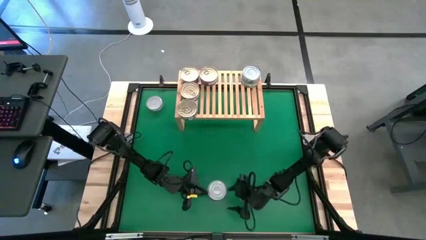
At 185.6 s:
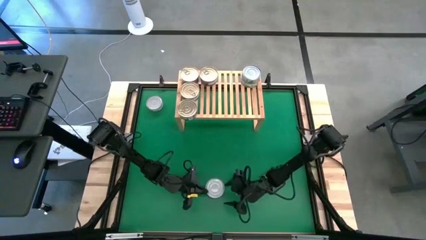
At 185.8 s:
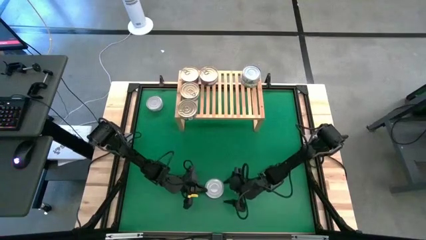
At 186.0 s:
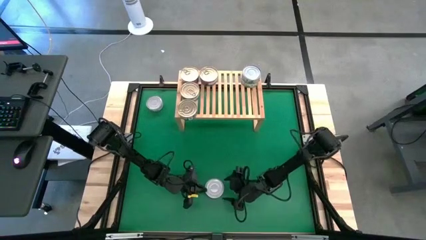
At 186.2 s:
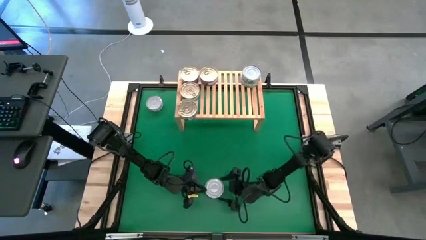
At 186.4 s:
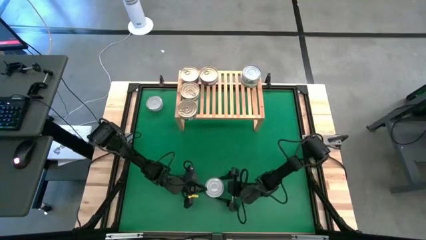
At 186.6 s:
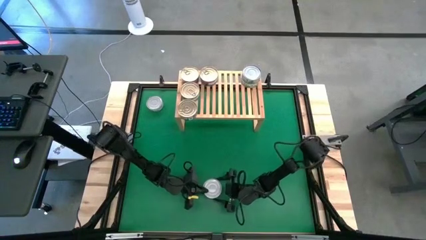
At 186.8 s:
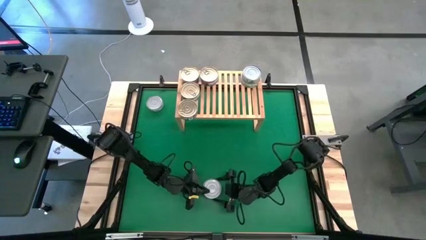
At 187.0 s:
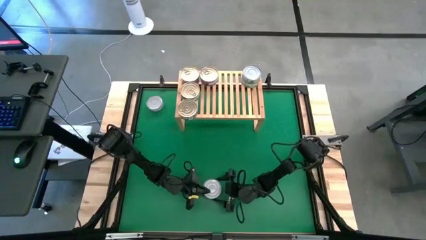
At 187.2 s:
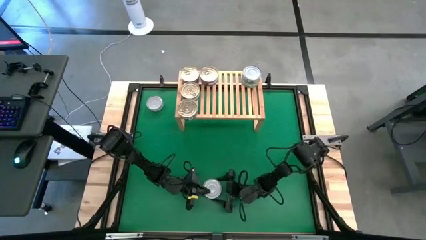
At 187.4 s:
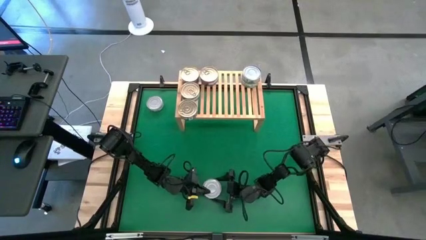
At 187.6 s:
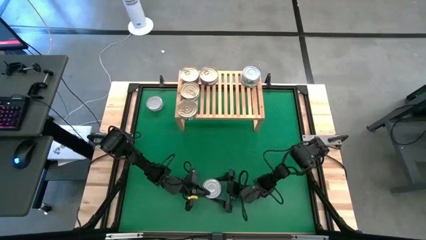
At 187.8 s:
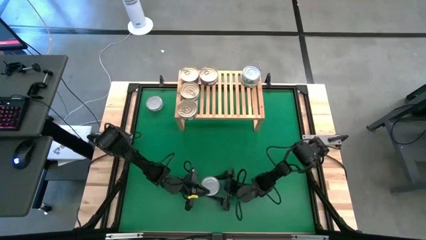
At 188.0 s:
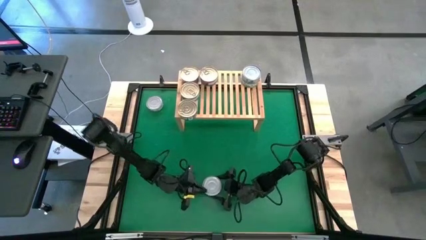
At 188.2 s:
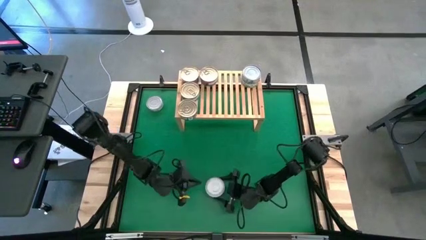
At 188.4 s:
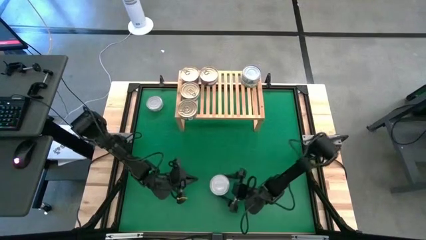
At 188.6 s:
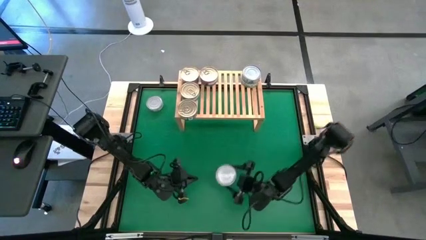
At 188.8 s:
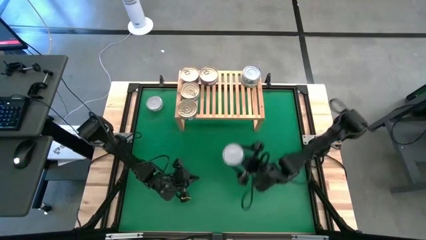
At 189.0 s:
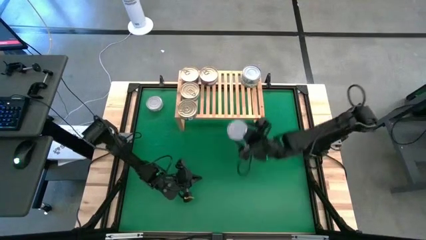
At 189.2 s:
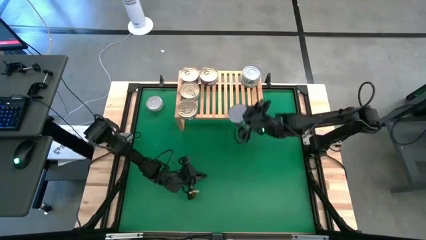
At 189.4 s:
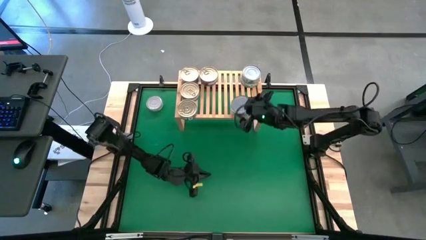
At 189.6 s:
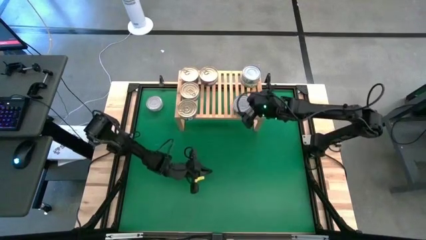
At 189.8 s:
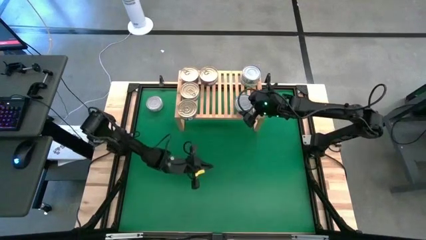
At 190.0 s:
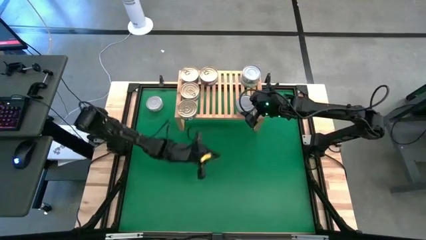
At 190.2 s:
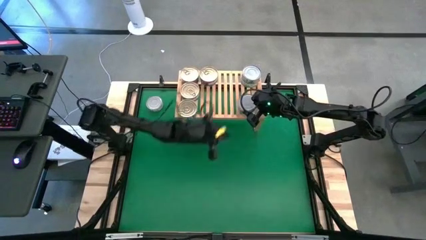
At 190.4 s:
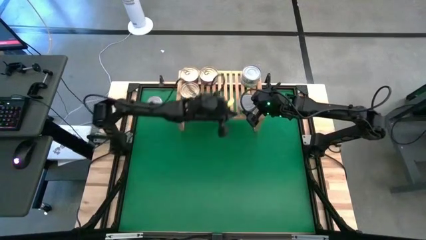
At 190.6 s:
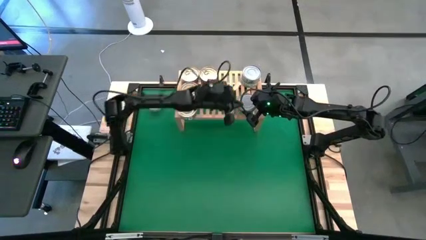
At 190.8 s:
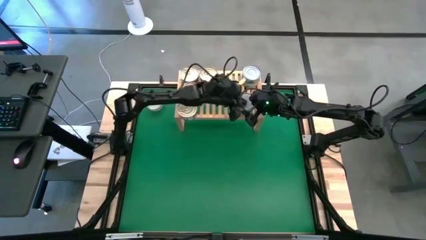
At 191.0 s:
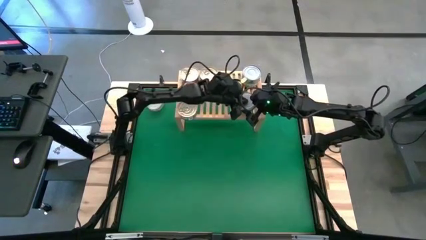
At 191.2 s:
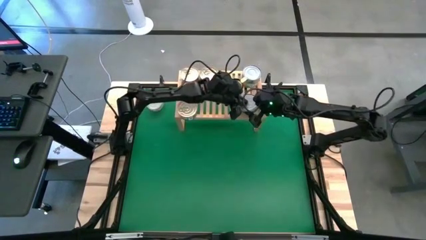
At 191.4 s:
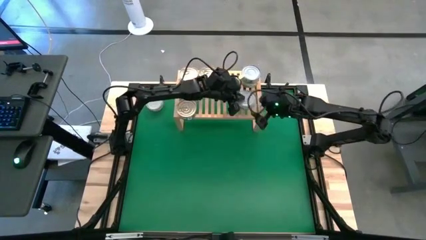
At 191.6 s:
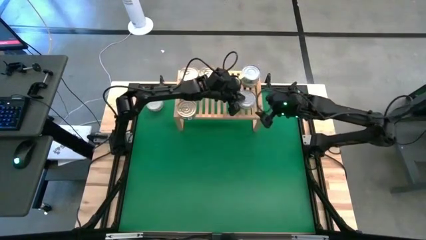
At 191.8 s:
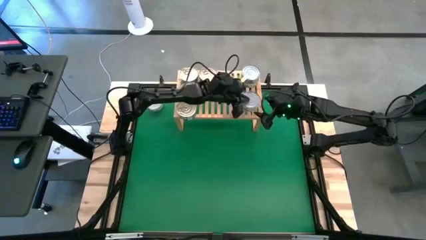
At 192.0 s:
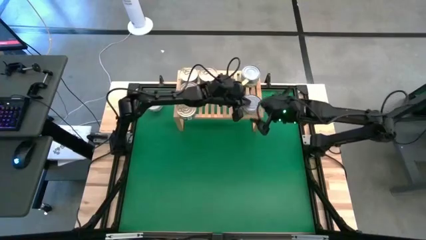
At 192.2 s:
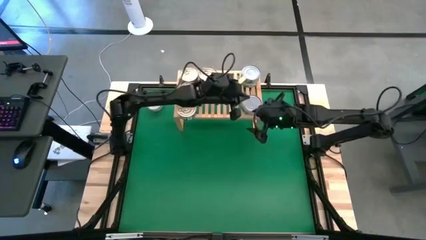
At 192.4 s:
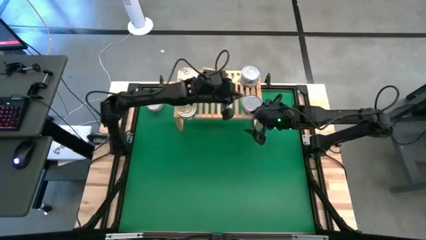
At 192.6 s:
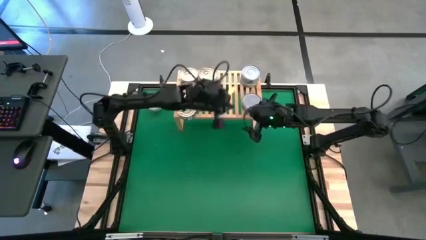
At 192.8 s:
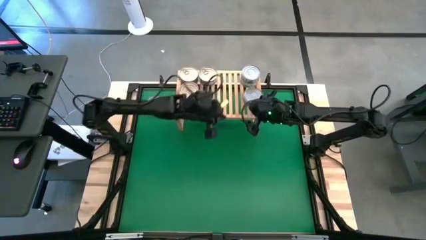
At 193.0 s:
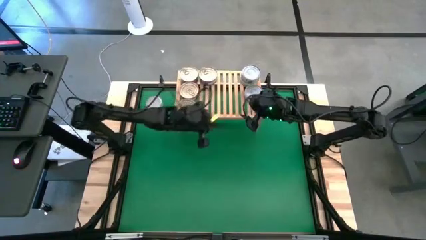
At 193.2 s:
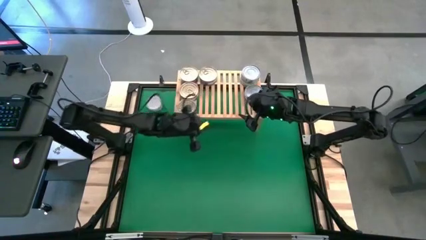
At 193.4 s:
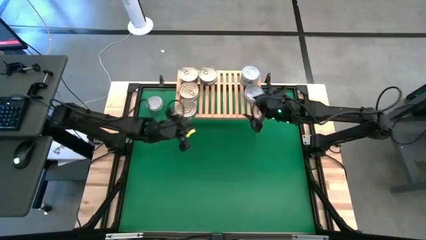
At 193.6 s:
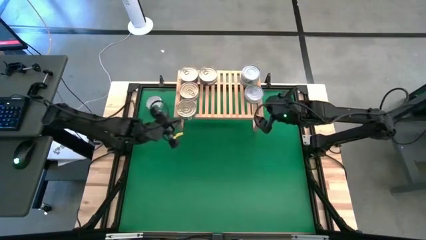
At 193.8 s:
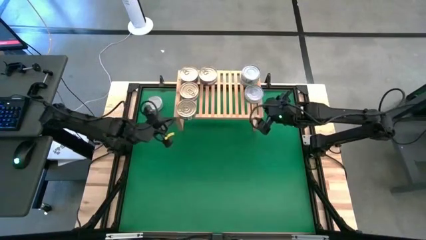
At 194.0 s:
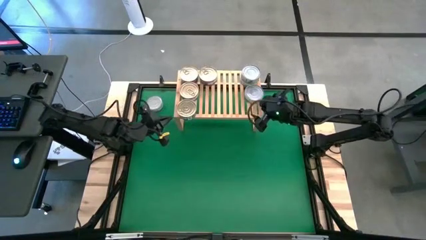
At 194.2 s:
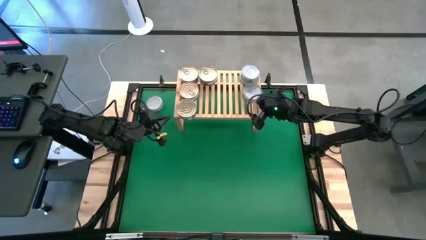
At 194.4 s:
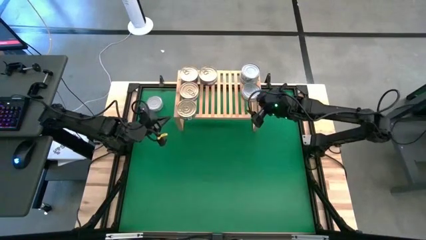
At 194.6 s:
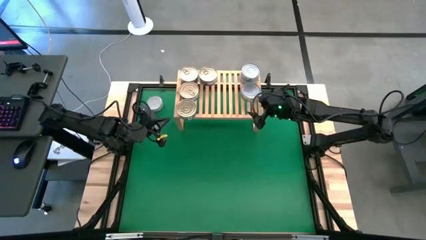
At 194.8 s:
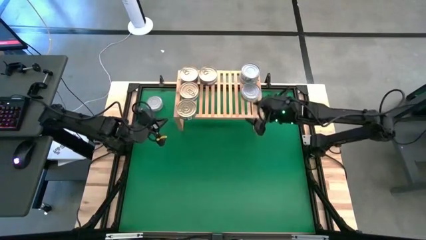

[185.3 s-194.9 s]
Task: Stack canned seafood by type on shelf
Put the center green tuna can on the shelf aligned with the other green tuna can

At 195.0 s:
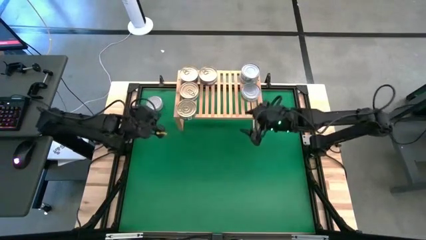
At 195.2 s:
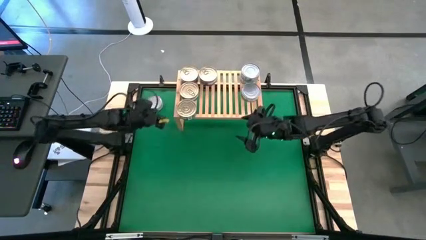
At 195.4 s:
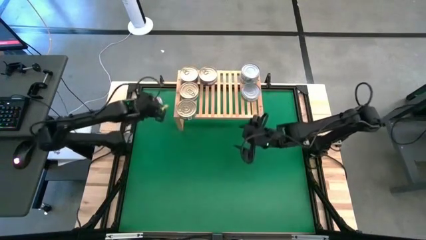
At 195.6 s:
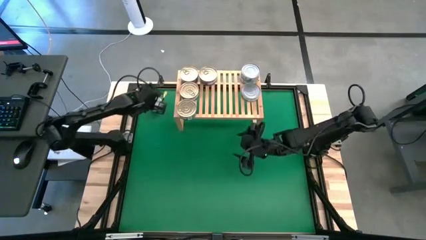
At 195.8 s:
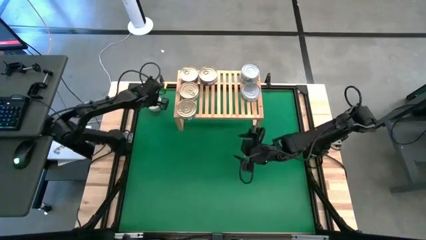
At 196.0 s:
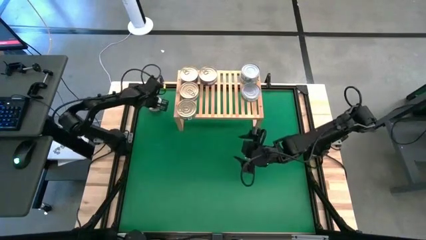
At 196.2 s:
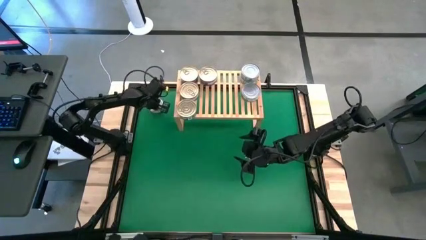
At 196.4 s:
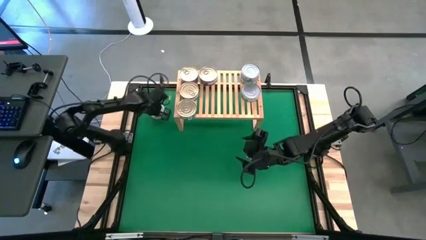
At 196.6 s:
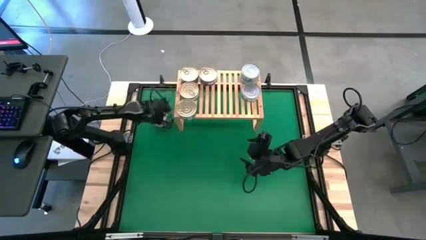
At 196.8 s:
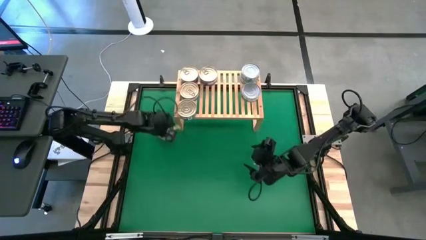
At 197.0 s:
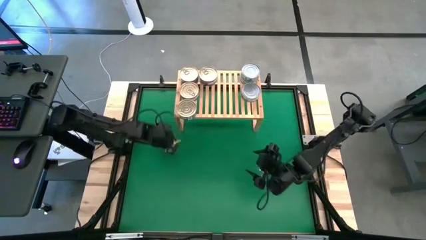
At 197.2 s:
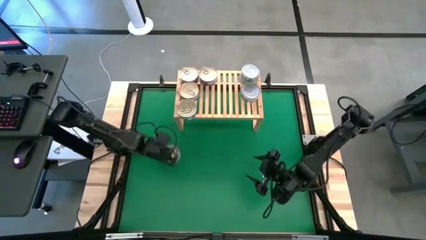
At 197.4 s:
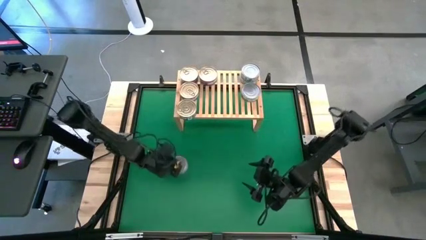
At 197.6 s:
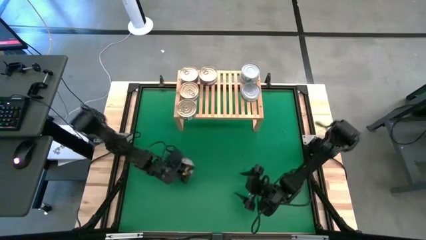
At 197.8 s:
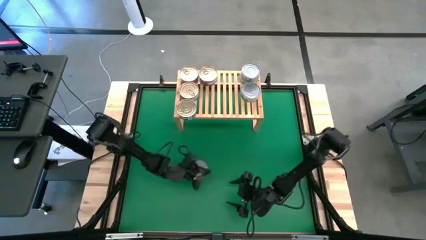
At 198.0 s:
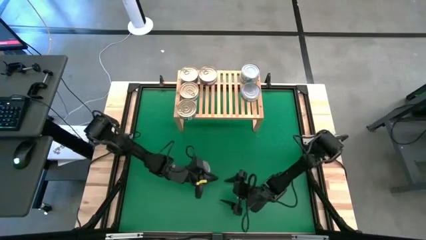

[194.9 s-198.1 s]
Move the green tuna can to the center of the table

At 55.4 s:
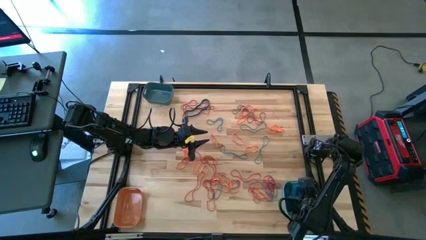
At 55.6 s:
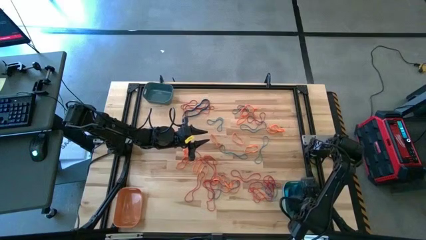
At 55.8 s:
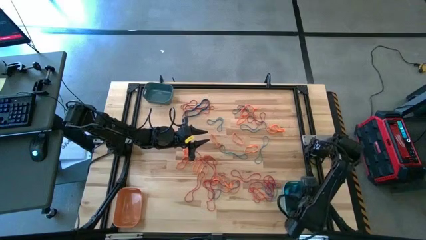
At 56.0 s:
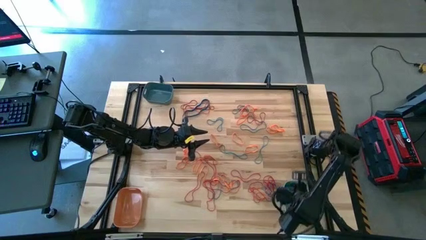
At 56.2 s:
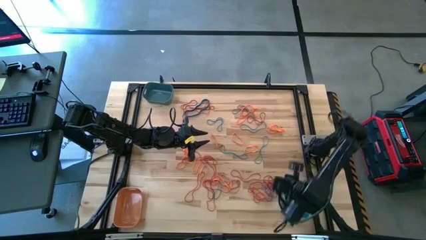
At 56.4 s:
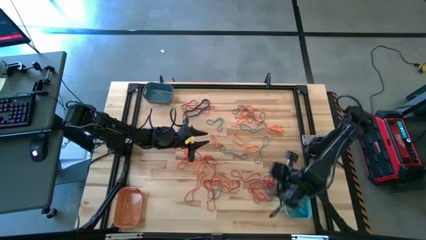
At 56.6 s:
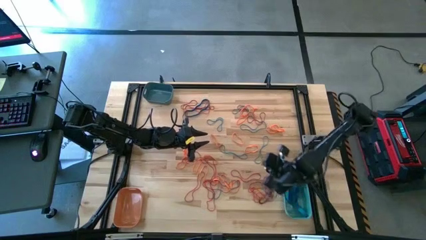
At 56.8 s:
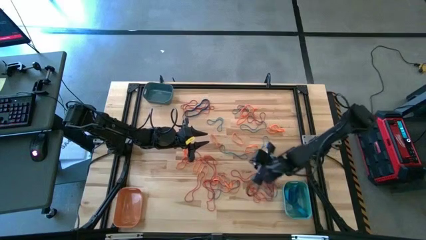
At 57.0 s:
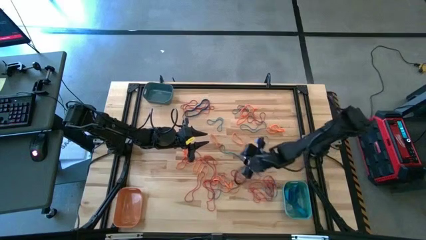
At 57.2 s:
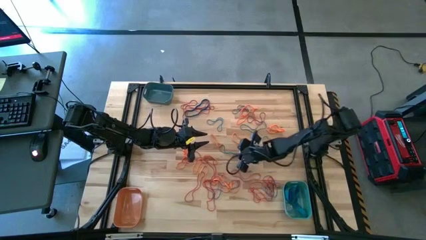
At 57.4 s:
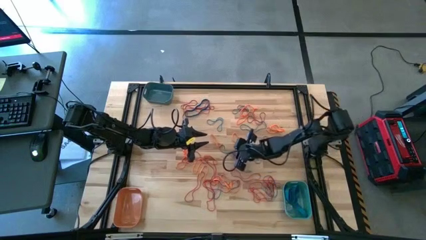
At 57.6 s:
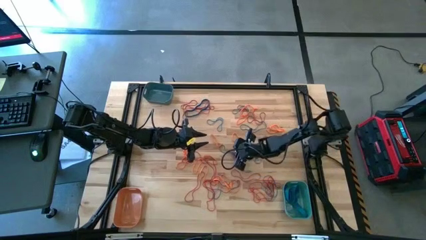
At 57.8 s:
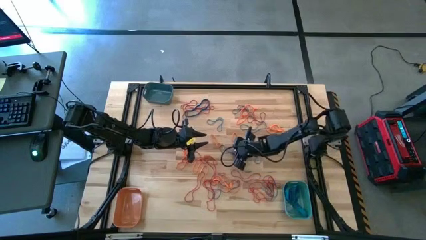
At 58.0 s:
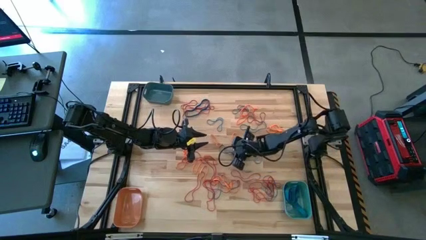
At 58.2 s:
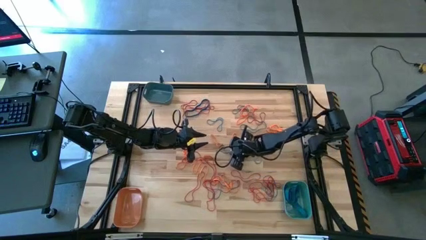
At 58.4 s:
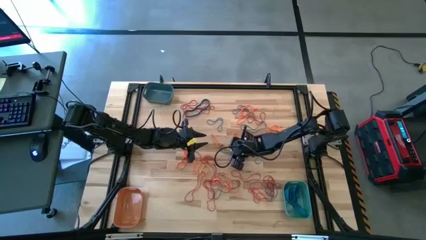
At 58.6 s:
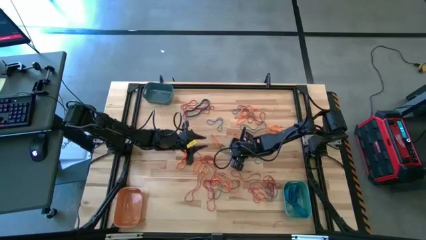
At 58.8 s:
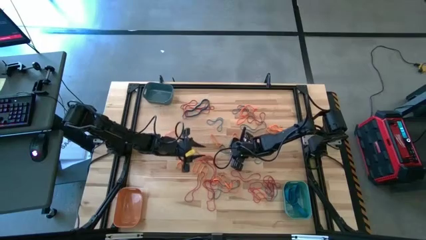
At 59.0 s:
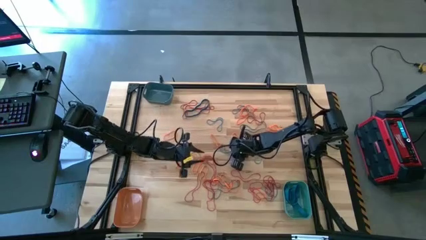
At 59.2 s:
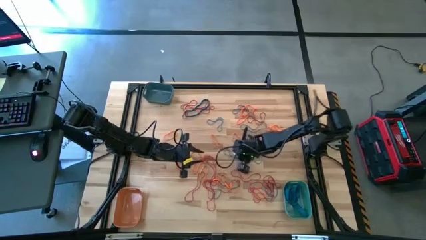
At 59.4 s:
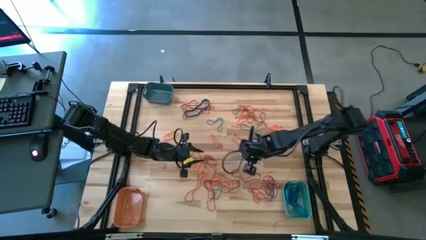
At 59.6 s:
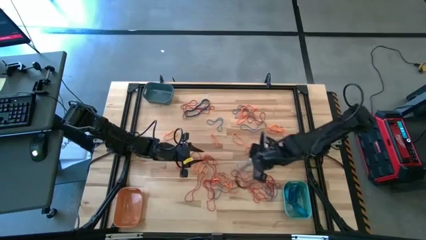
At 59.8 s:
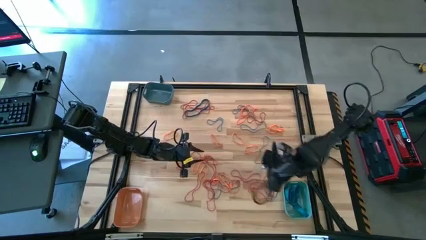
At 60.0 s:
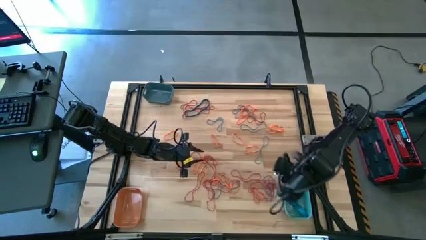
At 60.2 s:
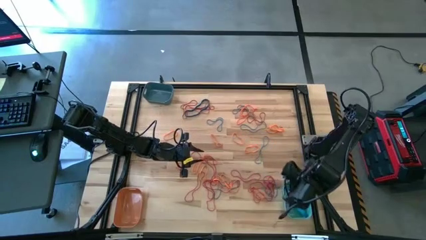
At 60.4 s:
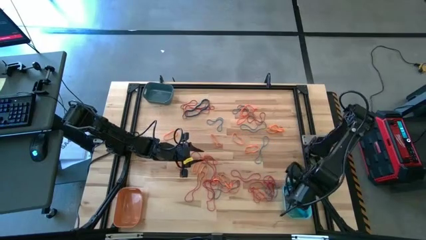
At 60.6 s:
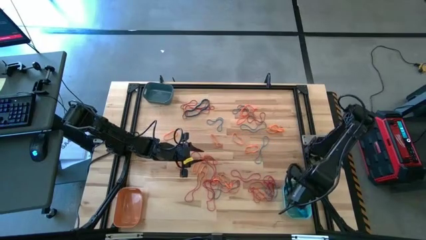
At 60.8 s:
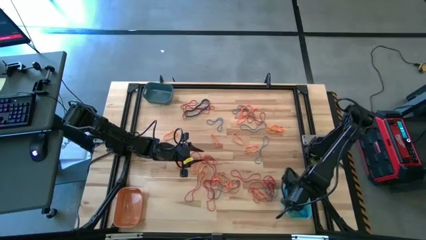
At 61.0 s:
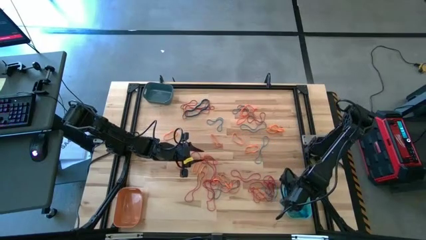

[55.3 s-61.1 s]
Task: Sort rubber bands into baskets
Put the blue rubber band into the light blue bin
